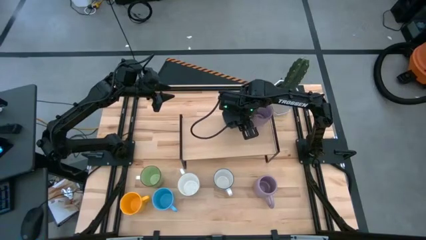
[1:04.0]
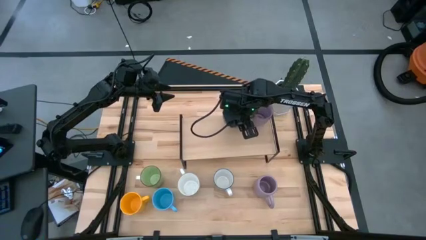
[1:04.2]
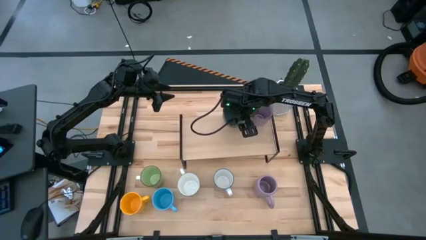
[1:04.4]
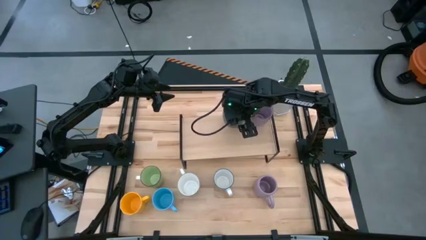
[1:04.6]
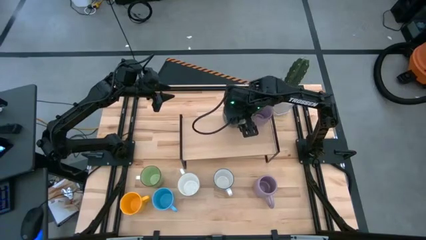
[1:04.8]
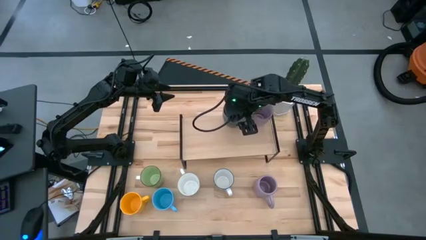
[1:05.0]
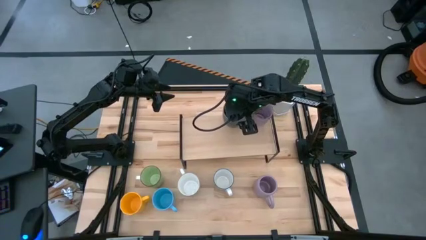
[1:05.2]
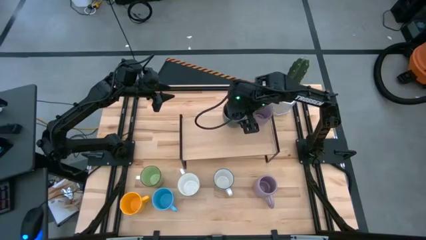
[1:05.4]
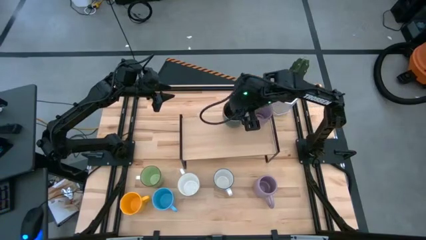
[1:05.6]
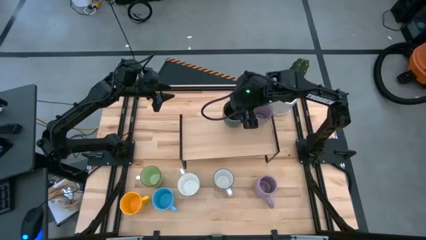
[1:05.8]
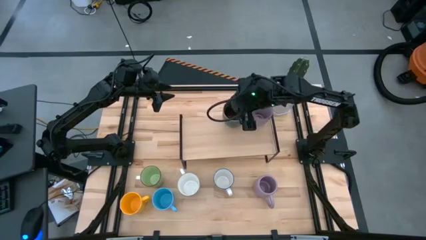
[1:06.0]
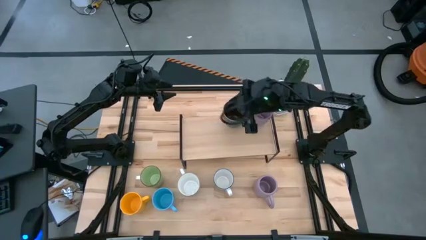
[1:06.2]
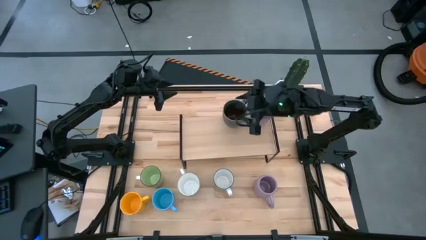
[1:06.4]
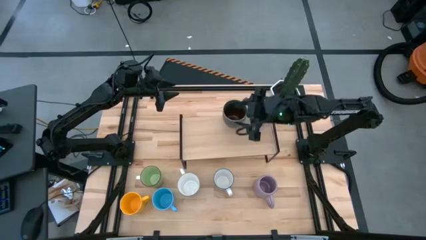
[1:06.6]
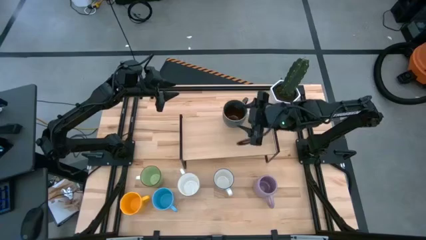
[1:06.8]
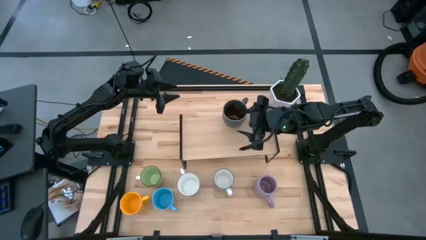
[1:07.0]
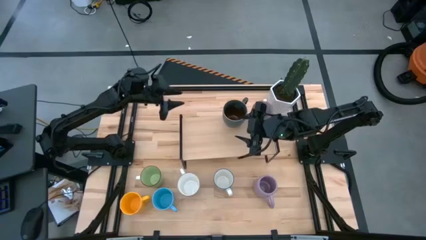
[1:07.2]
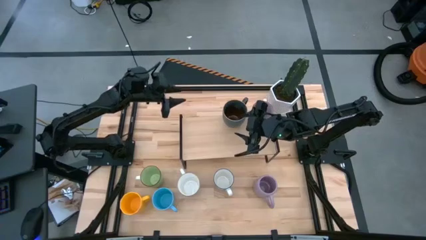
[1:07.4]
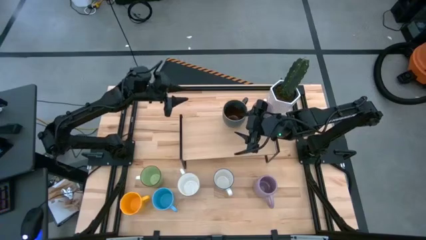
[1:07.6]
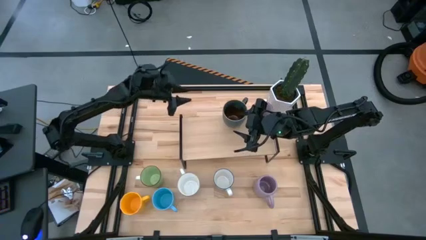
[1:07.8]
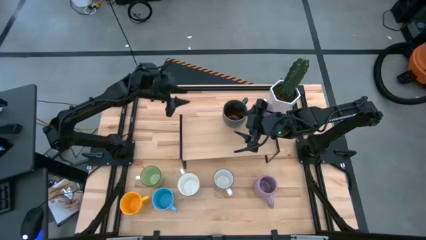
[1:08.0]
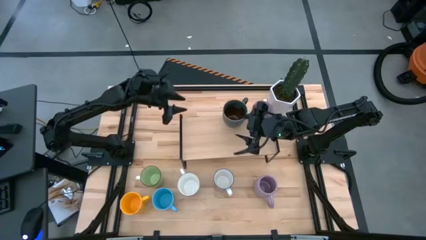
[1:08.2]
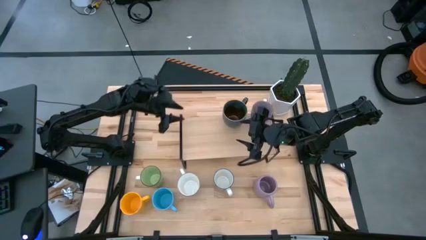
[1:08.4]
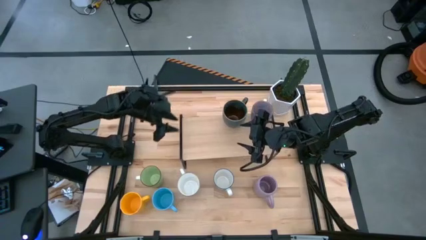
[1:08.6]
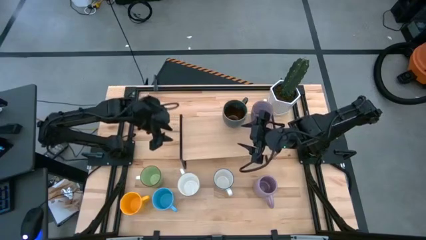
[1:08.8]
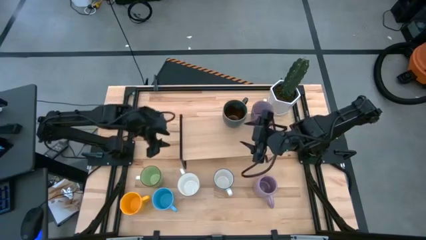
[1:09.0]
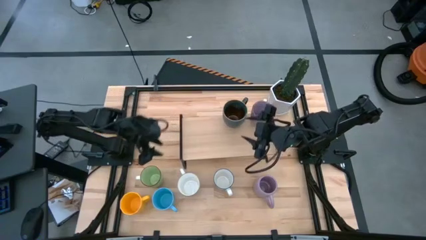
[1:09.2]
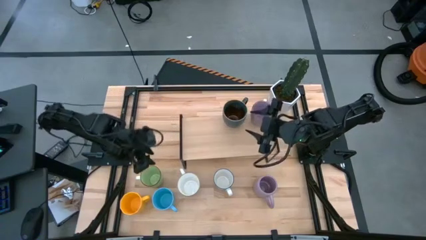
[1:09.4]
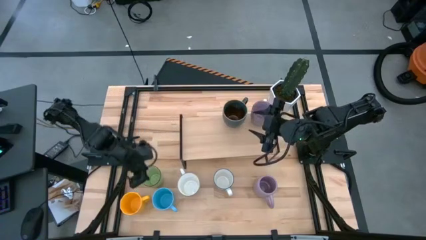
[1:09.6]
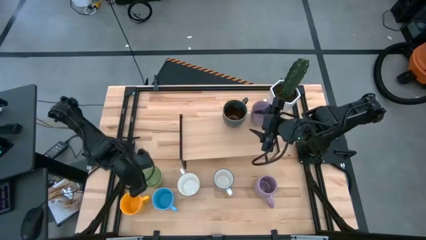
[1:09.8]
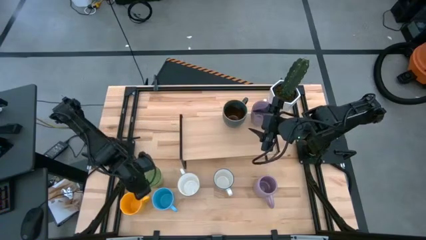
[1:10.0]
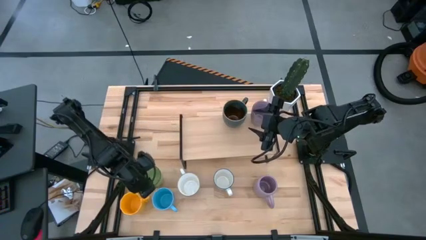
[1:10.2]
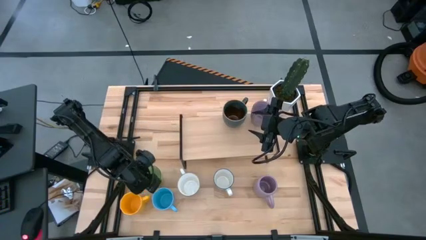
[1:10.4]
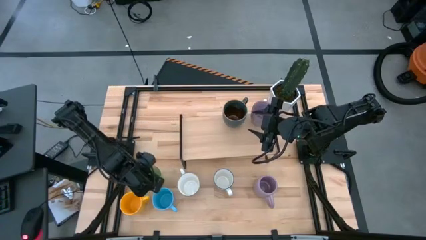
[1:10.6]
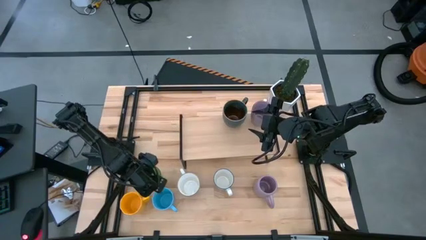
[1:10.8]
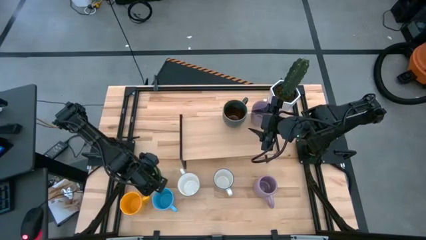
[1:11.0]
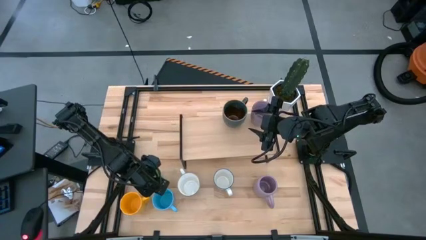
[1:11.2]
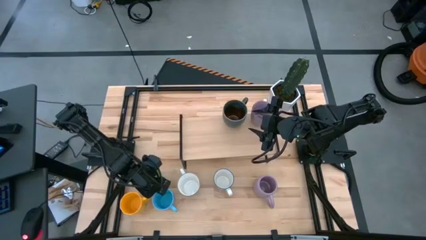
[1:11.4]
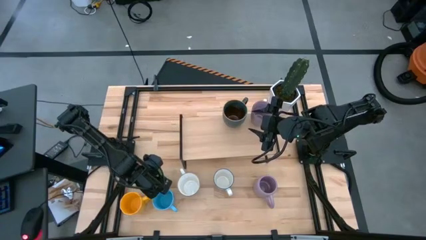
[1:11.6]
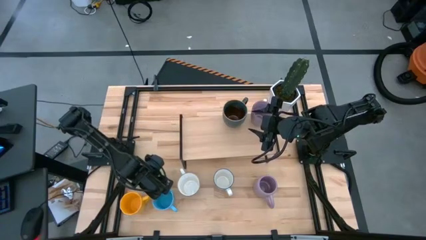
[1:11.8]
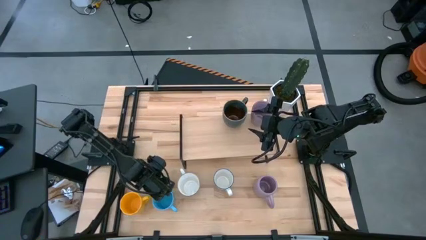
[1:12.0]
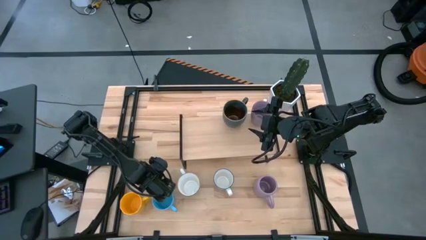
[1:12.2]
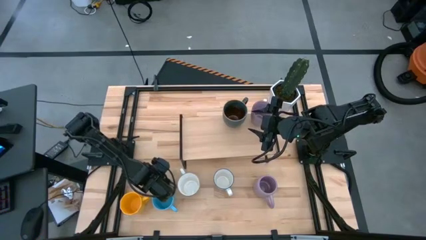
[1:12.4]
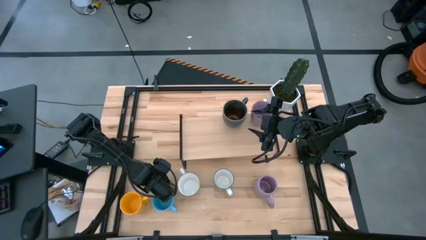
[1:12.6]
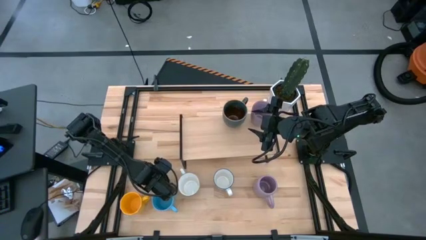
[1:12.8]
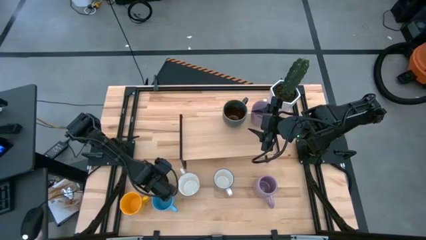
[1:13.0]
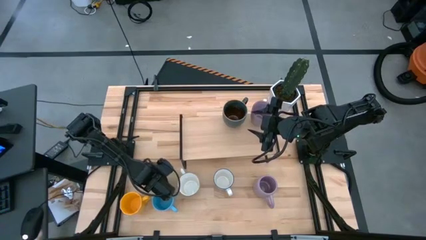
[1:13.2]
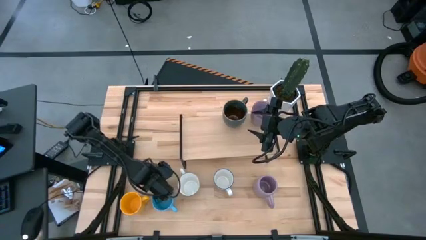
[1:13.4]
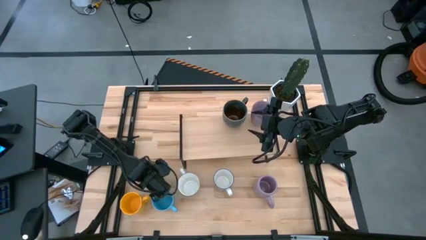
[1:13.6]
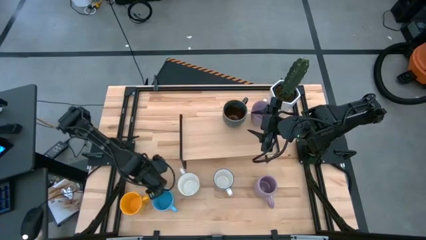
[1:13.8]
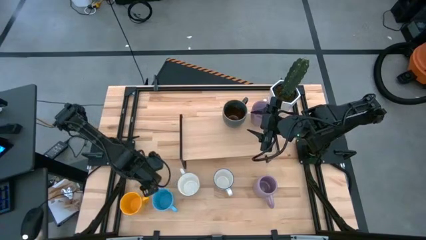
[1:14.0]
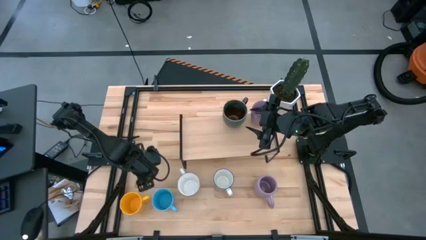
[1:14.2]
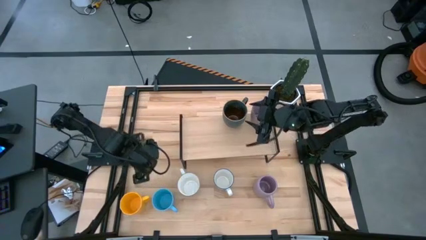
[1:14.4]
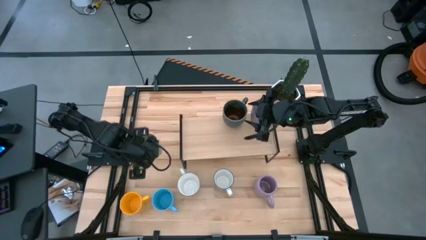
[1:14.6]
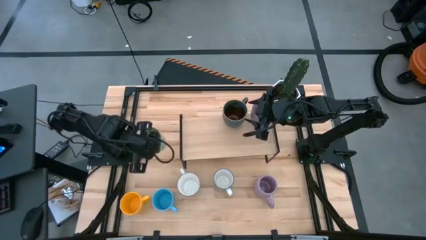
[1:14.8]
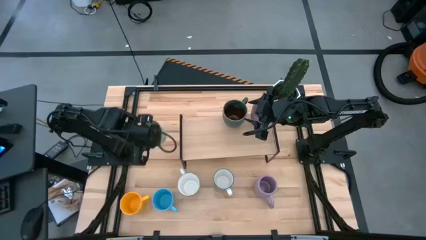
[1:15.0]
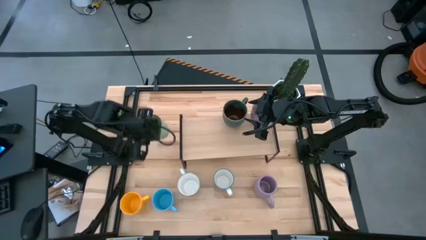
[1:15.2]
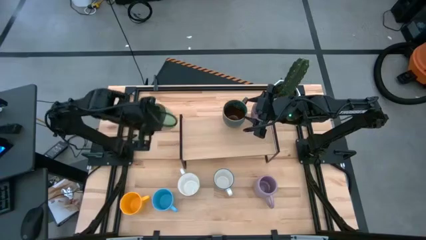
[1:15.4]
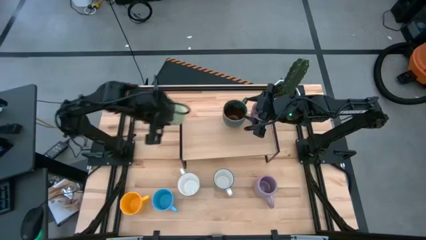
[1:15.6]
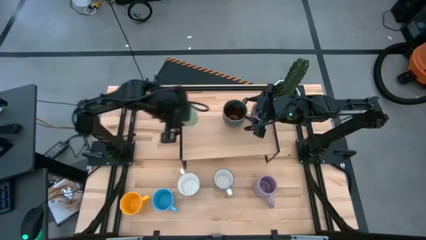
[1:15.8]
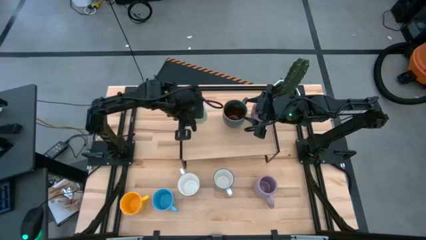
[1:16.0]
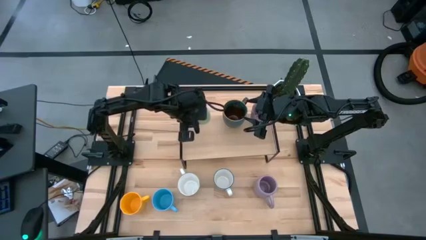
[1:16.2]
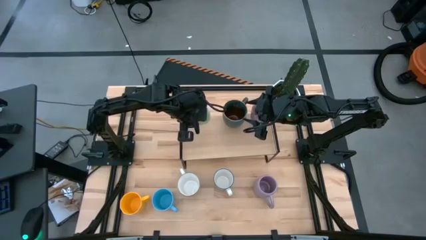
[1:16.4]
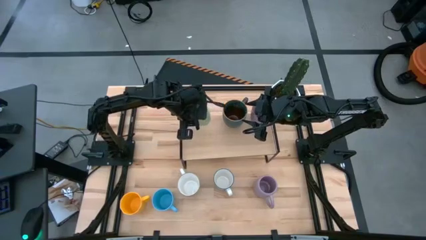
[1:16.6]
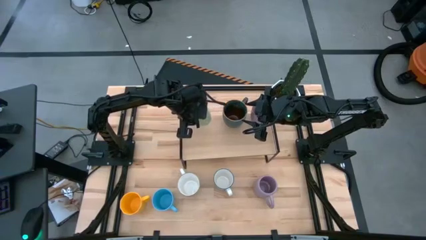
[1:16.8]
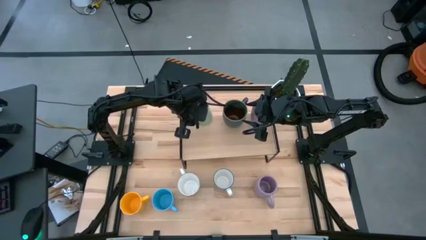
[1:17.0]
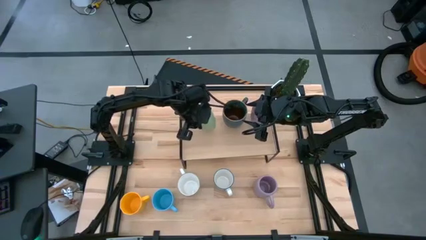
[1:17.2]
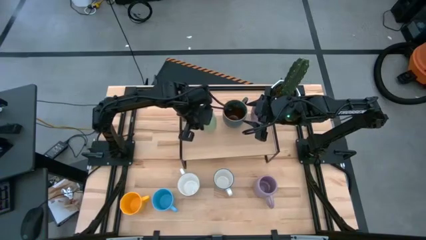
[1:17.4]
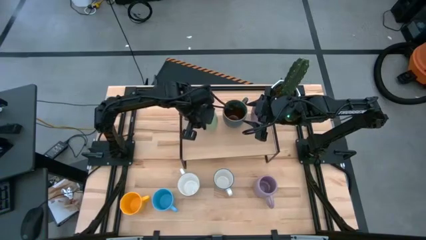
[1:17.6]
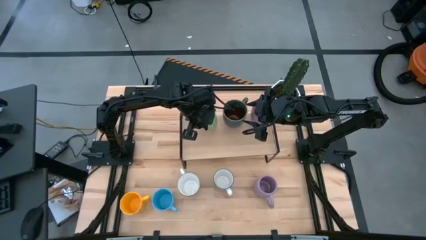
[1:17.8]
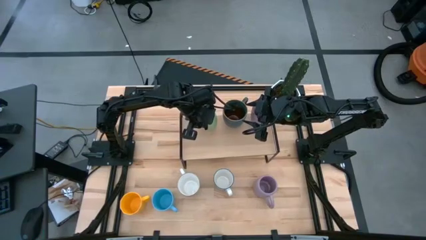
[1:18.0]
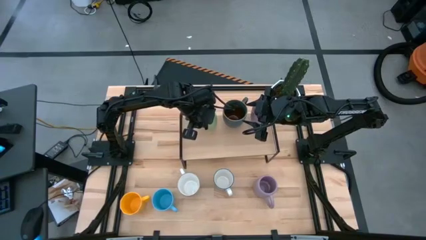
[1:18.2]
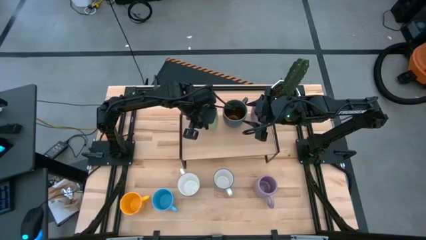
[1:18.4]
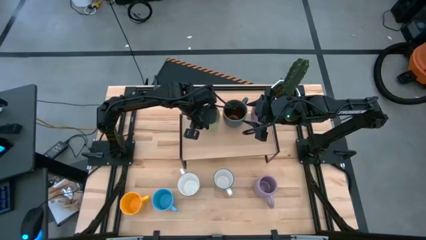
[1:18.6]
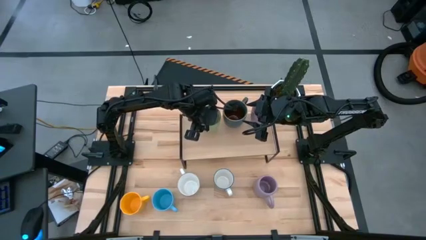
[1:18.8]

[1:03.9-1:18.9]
Task: Place coffee mugs
Put the light green mug on the shelf

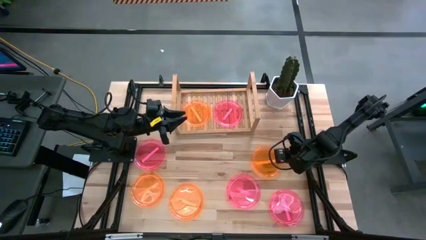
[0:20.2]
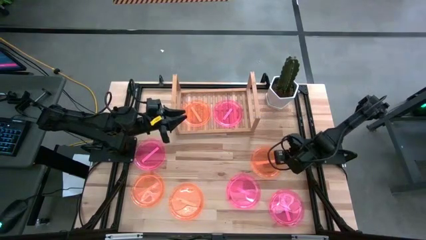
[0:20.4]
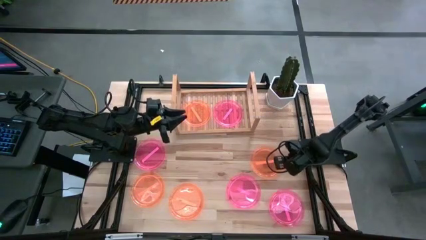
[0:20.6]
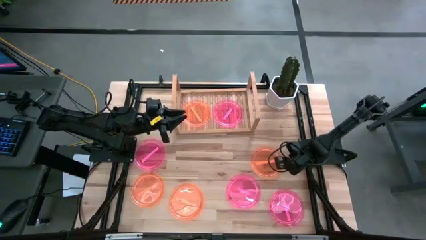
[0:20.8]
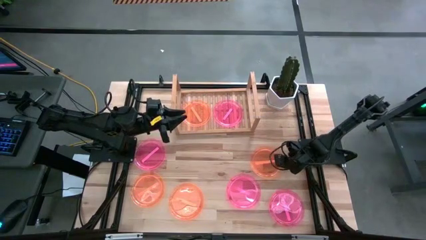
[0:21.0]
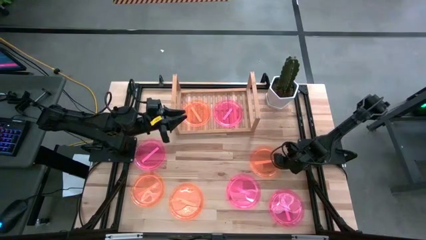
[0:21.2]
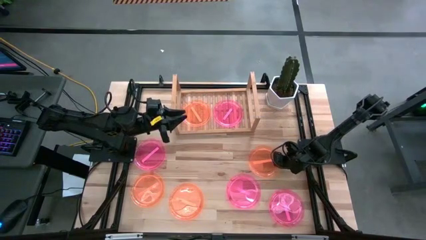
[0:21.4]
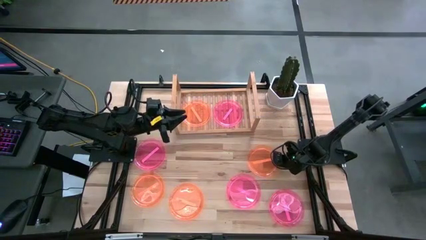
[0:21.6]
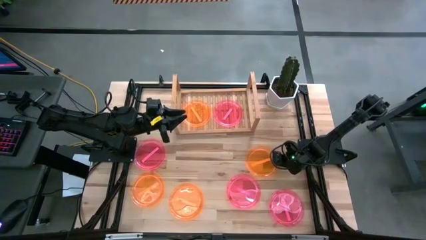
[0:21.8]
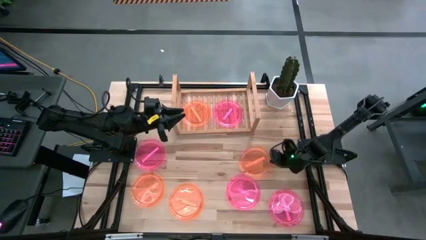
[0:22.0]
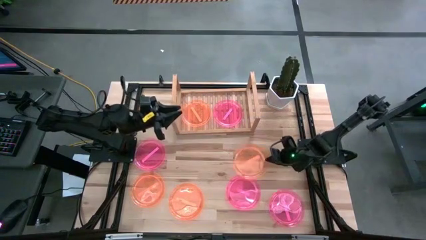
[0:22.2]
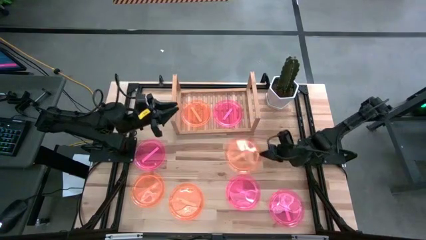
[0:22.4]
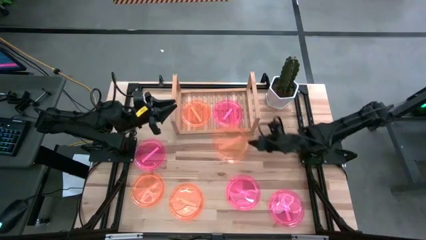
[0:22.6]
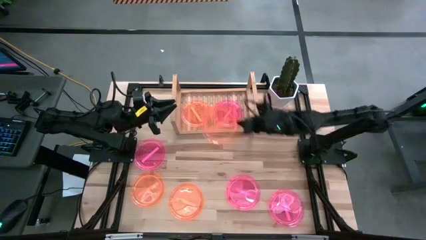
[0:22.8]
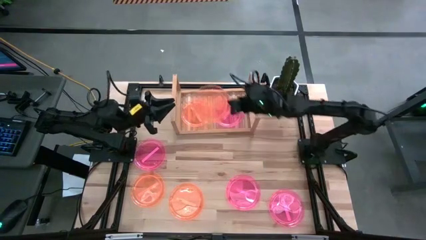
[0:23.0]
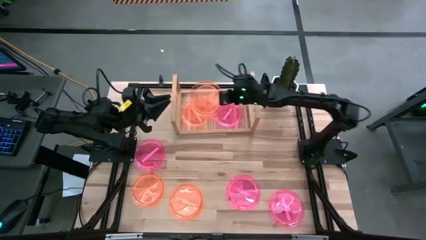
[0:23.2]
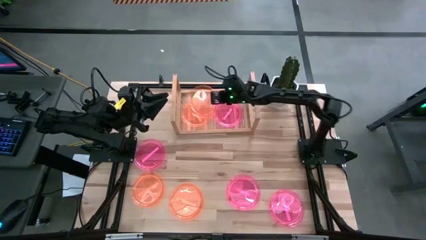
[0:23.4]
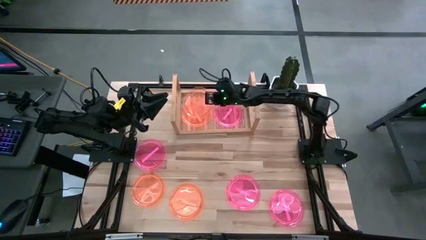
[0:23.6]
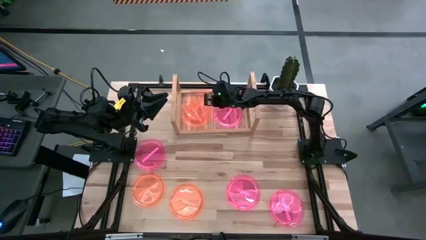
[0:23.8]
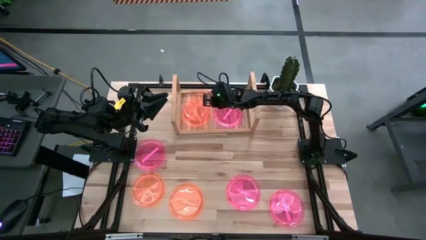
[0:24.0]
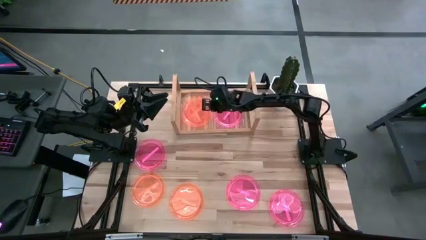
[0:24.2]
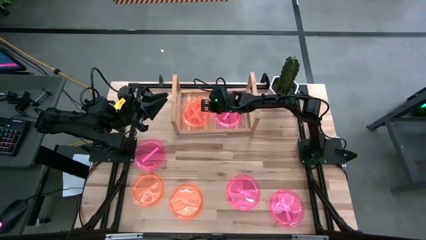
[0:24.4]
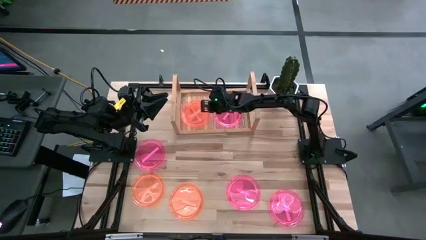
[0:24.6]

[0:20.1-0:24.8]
Task: Place and stack plates onto a shelf
Stack the top right orange plate on top of the orange plate
